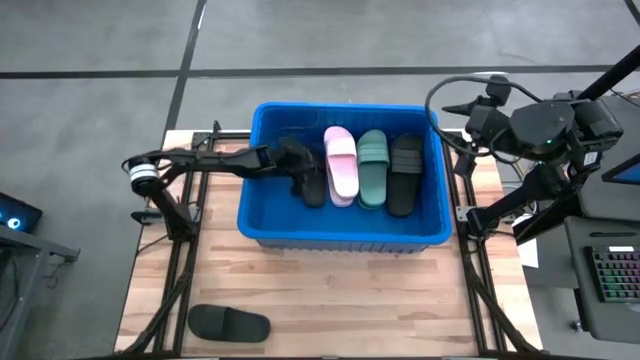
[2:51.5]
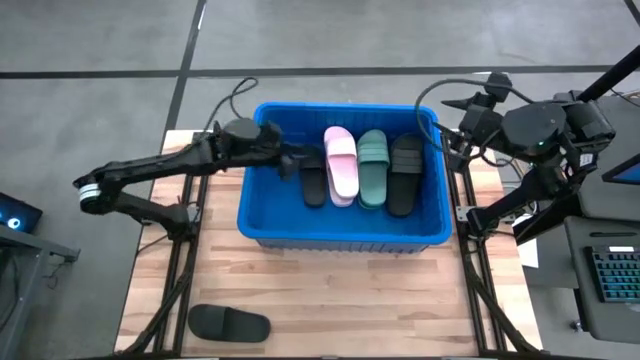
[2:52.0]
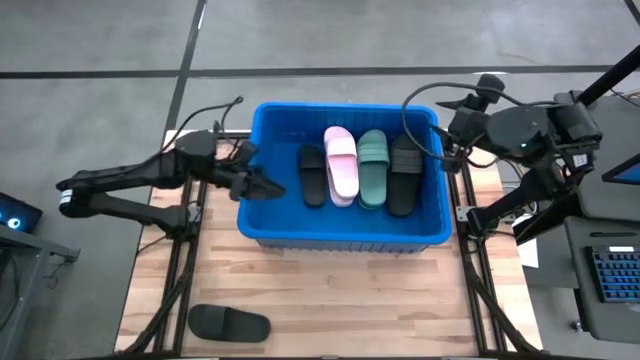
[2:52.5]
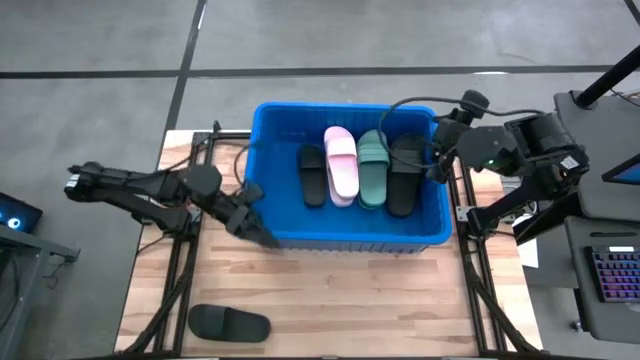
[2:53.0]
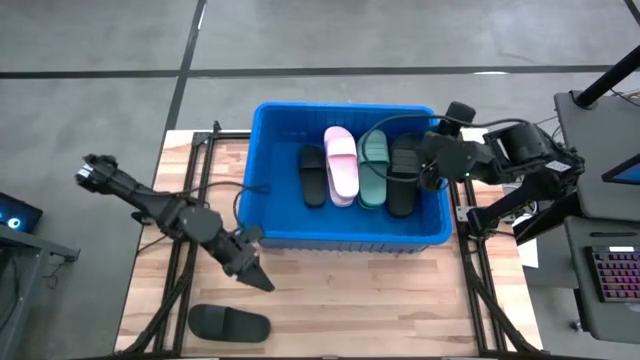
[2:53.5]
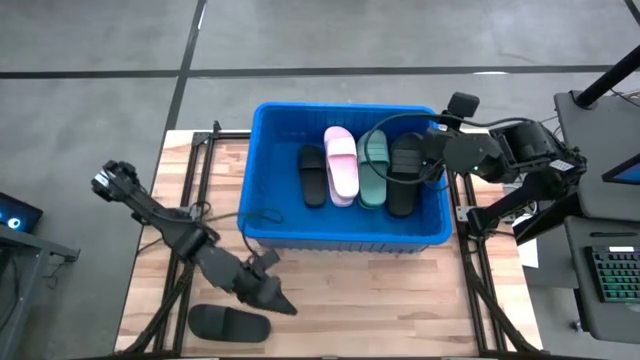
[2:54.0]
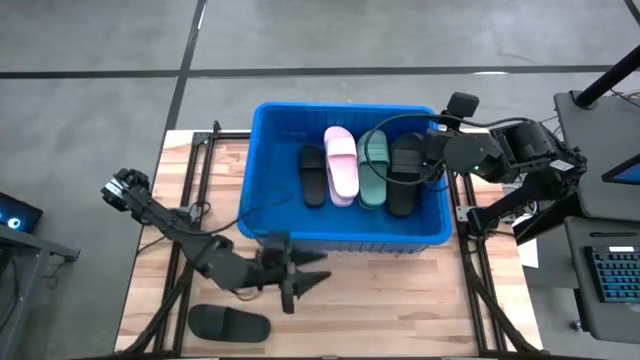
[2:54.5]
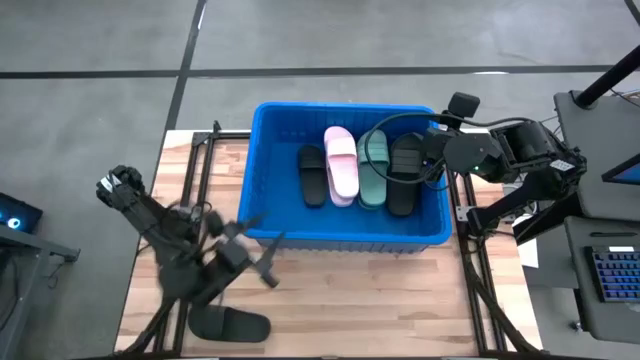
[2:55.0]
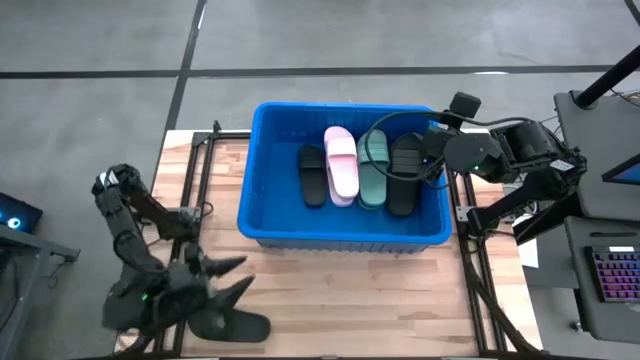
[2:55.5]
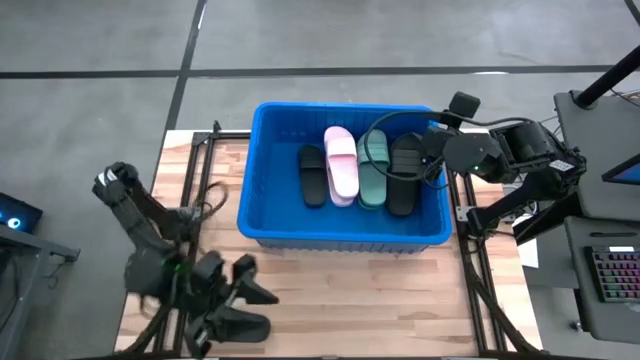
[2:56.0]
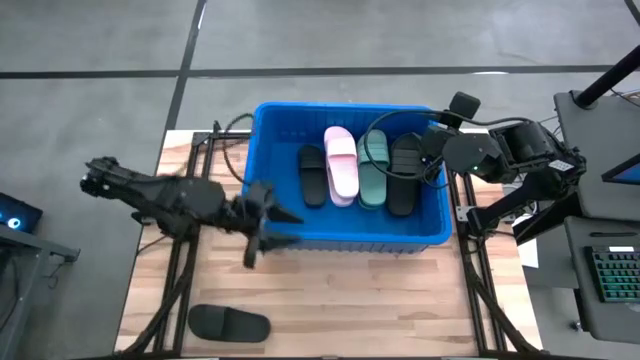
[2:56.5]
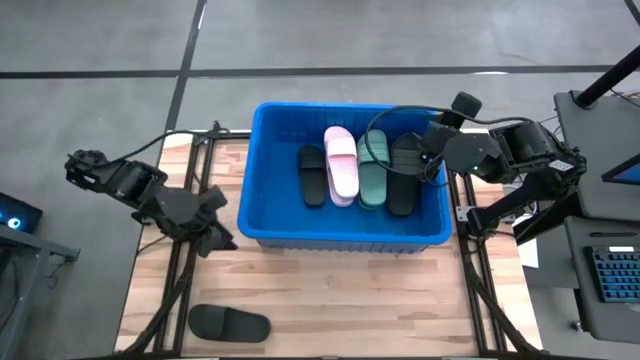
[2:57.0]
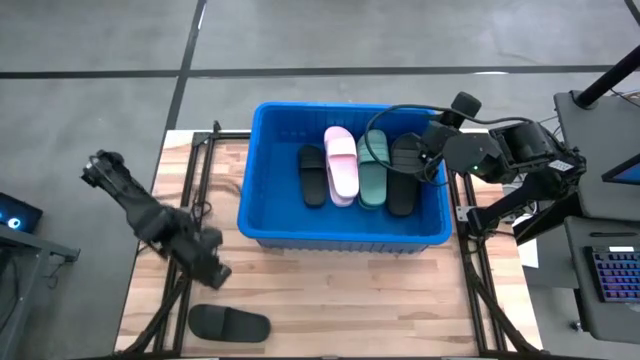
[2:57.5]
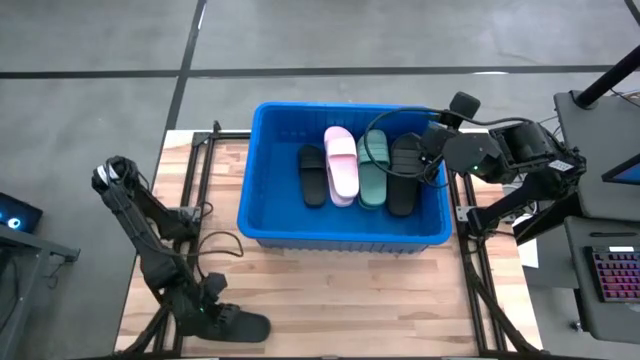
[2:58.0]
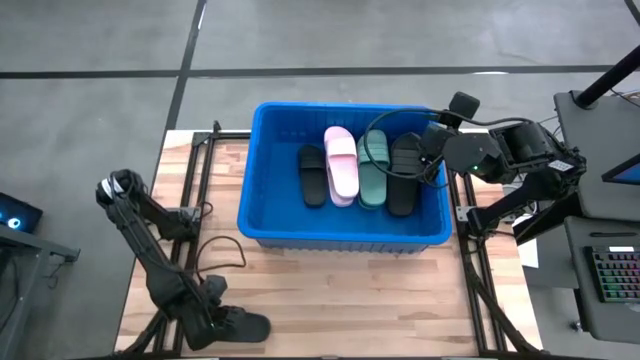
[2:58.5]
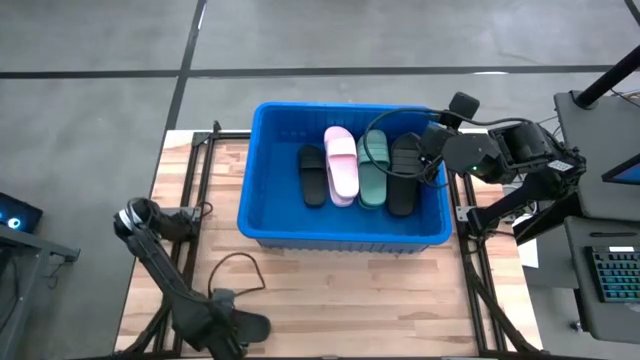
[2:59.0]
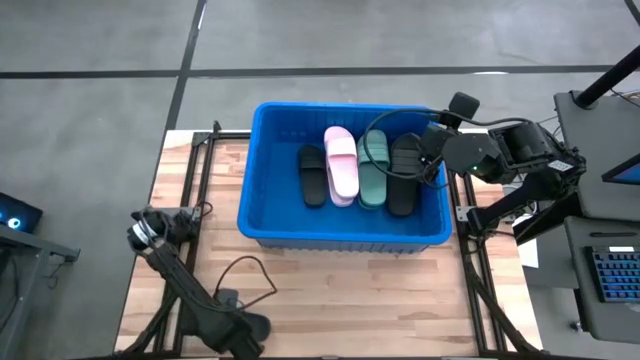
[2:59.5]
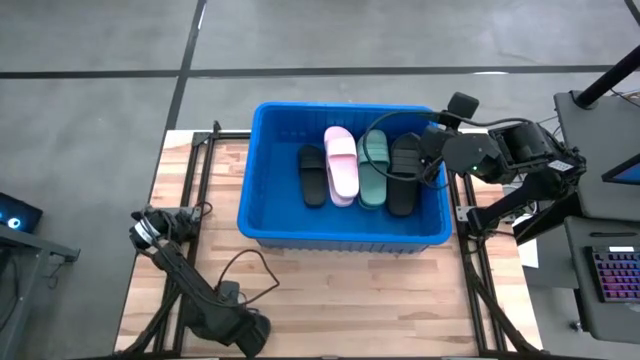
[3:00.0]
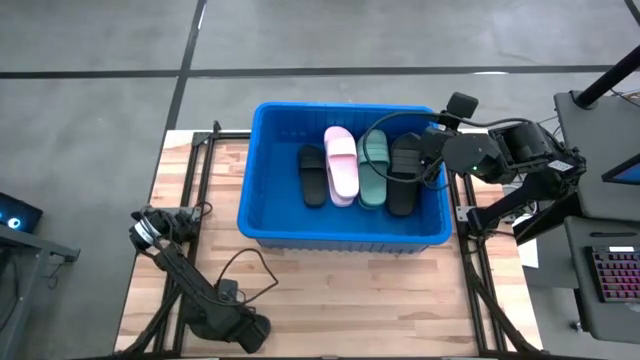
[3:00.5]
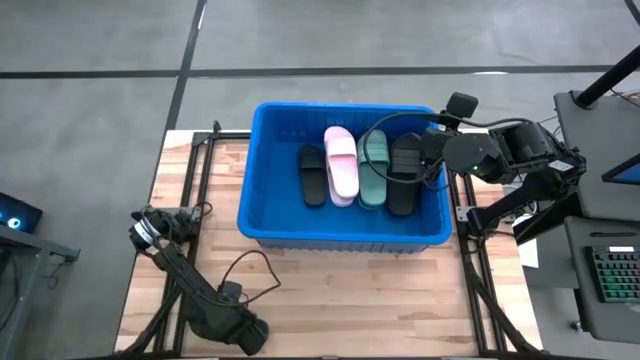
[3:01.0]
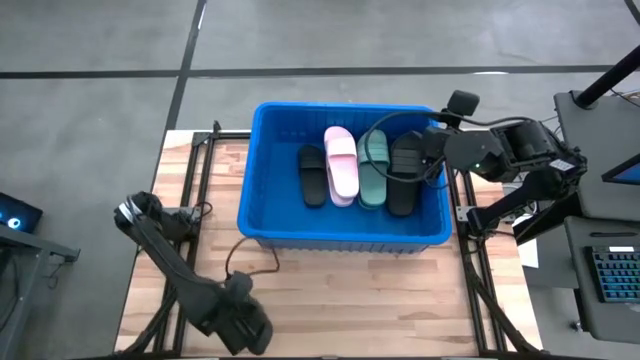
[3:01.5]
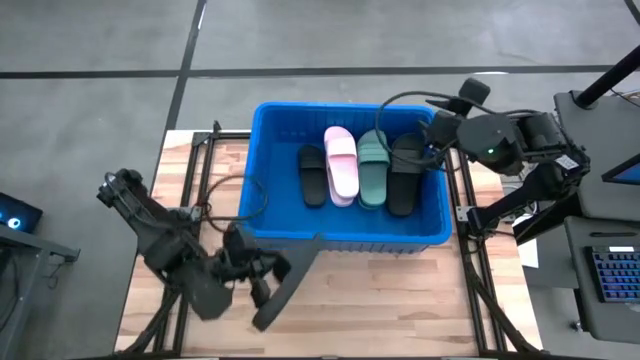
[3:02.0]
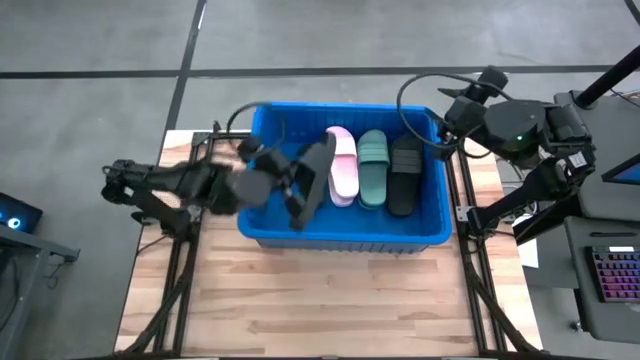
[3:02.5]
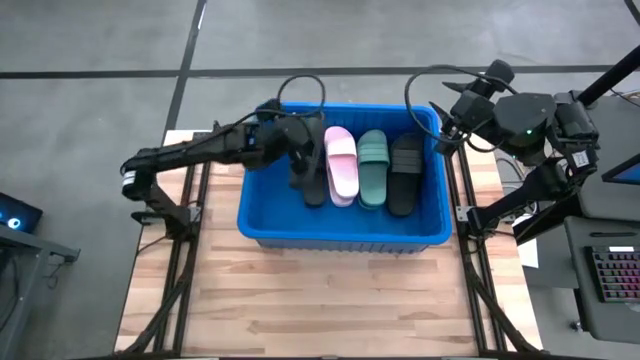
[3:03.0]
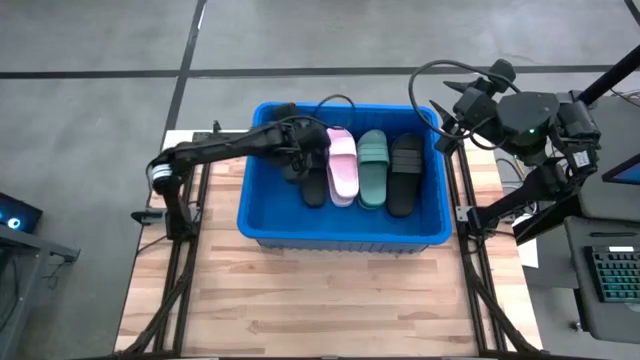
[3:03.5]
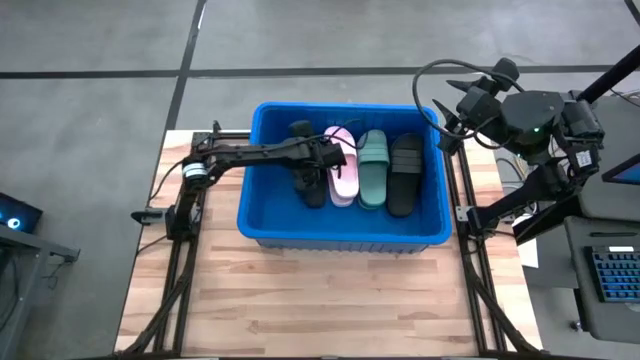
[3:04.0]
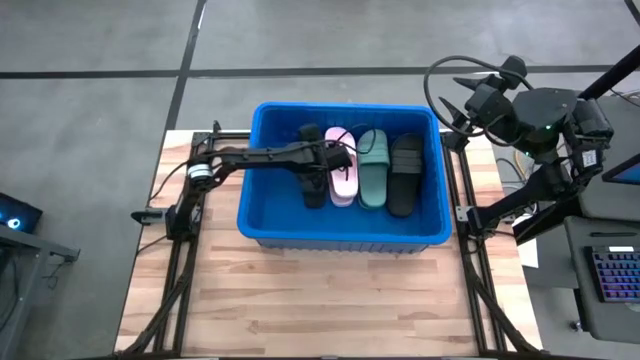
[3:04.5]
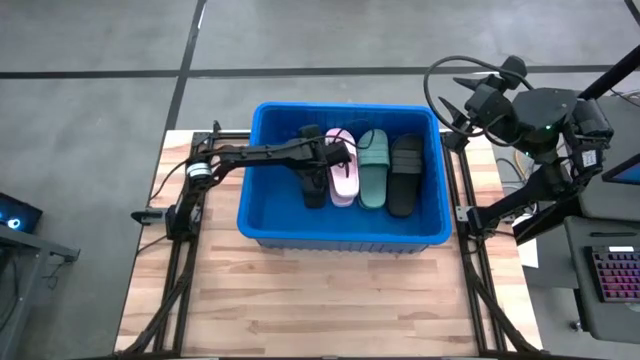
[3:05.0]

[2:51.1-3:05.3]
Task: Pick and place slides into bin
Put the black slide into the blue bin

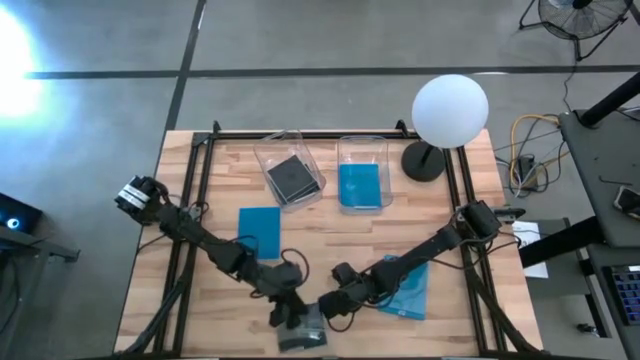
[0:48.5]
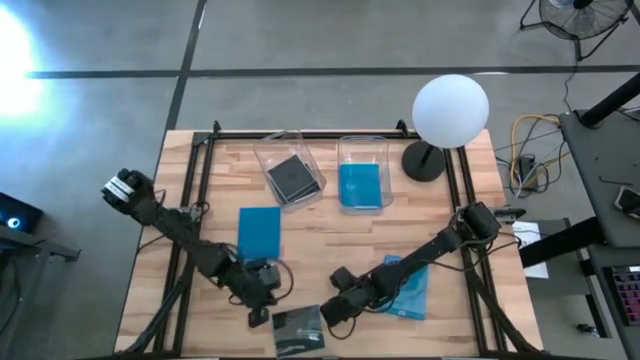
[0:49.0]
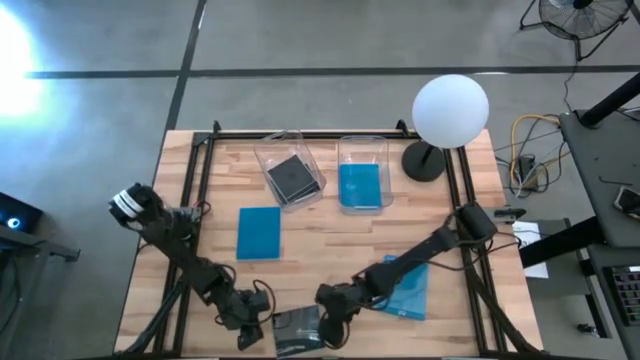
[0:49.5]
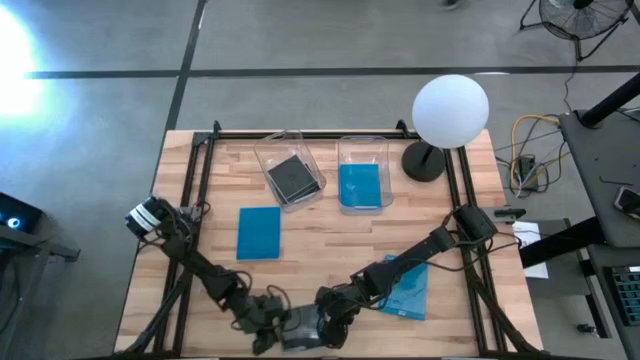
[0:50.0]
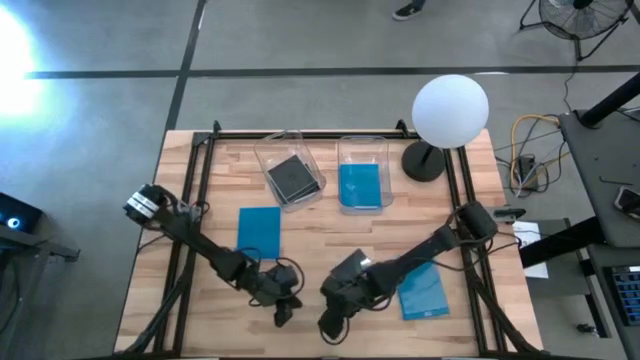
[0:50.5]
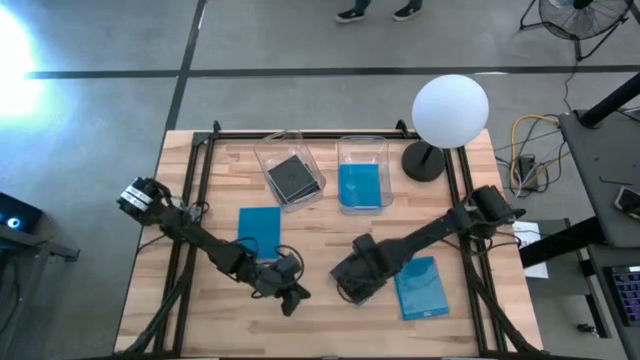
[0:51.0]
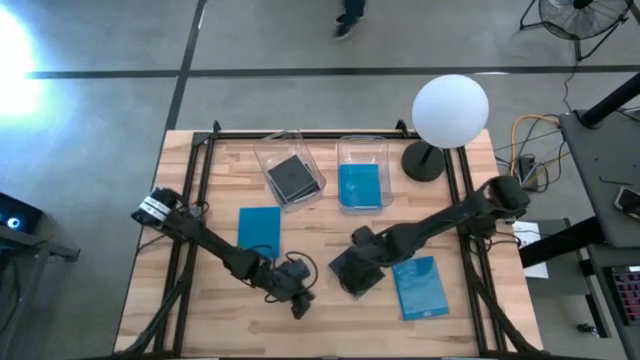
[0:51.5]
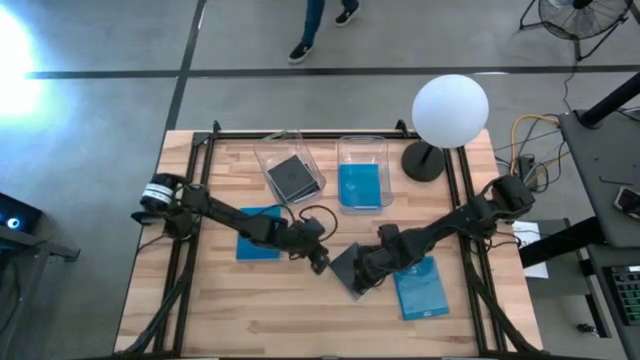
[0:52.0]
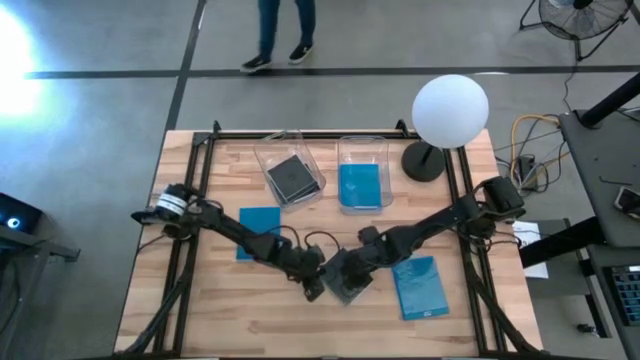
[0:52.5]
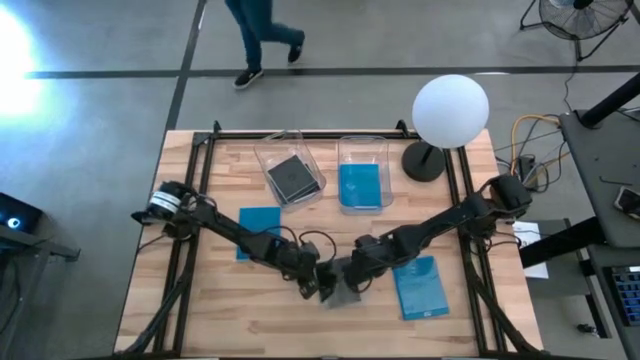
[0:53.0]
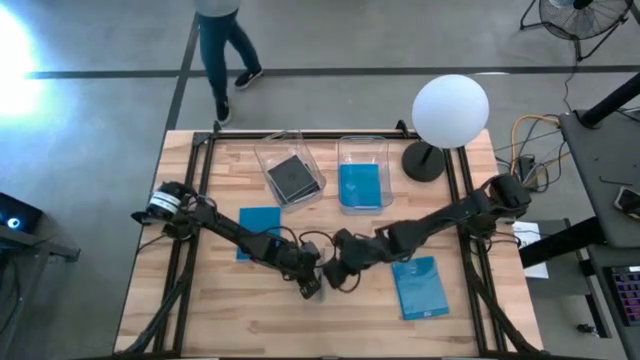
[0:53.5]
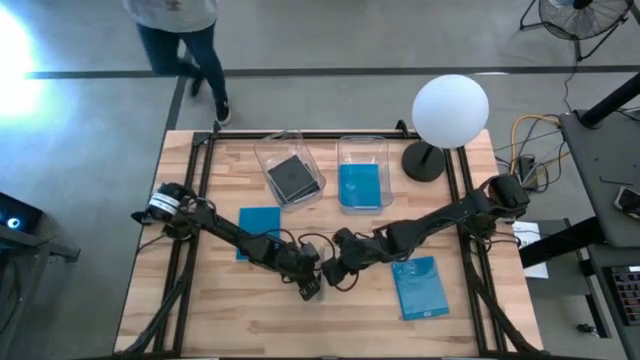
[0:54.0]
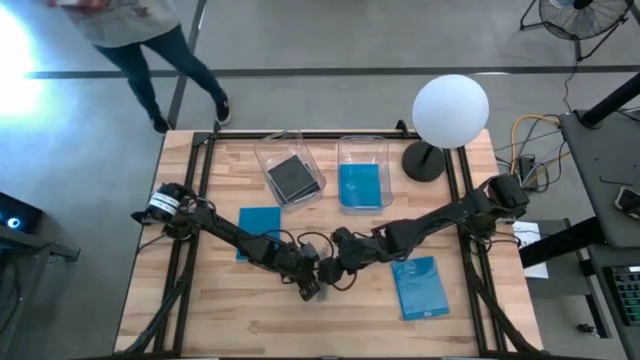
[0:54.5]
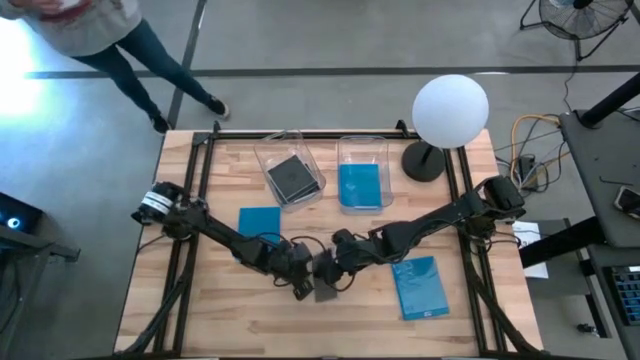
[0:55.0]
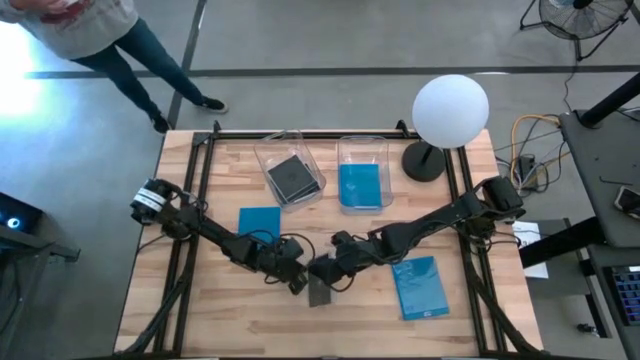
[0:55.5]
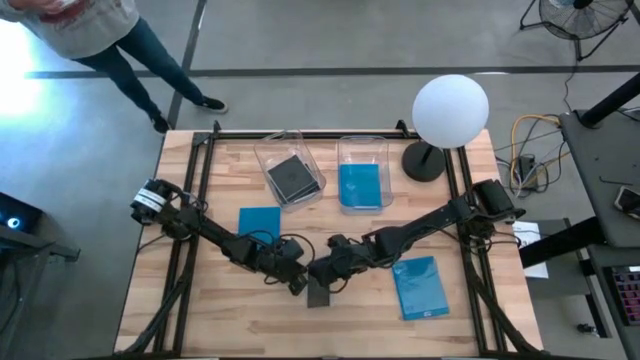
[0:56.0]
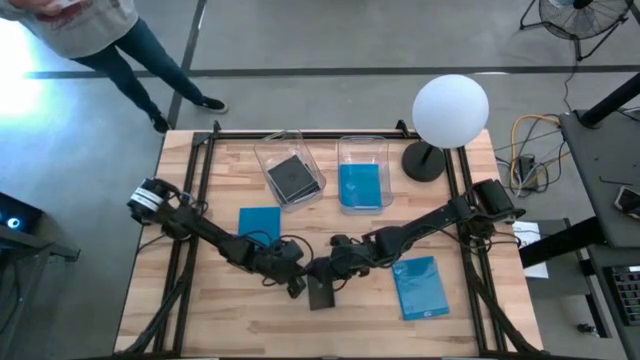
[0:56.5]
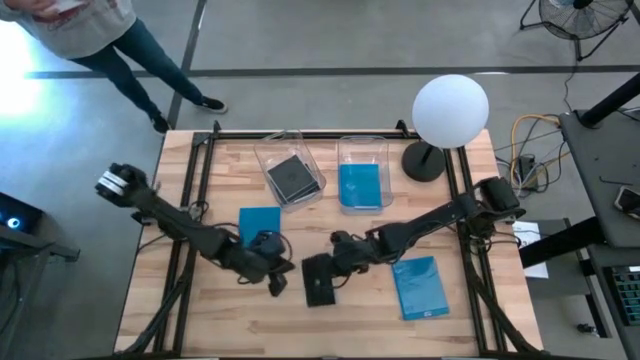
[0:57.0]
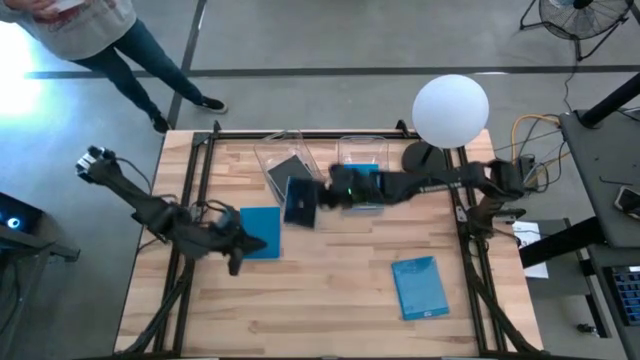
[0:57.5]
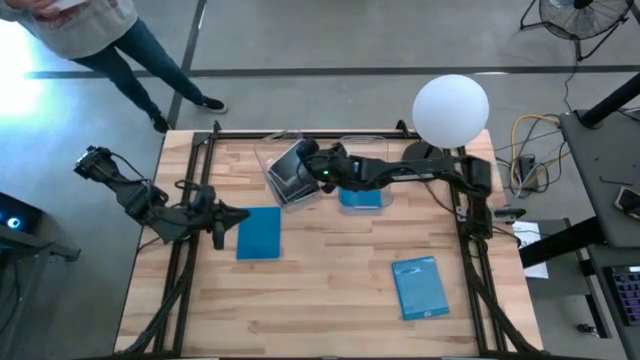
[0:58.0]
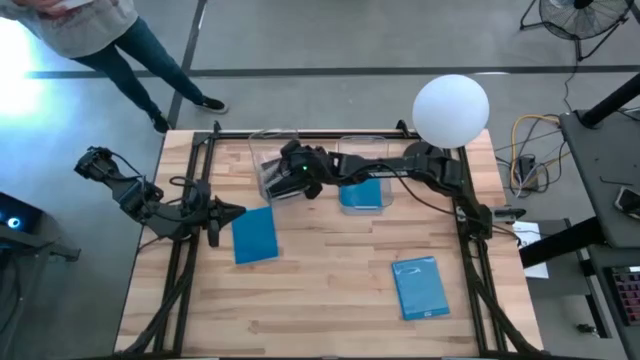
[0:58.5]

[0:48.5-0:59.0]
Task: Pick & place jewel cases by type
Put the black CD case on the table into the left transparent bin
